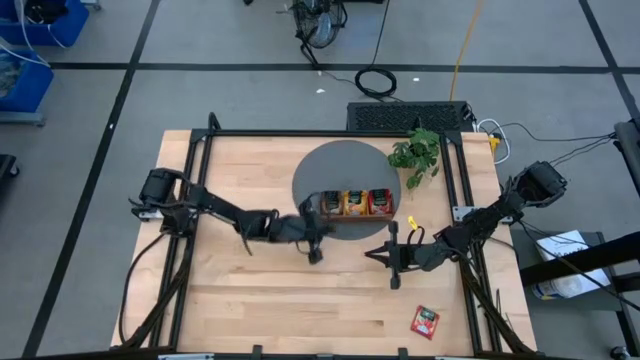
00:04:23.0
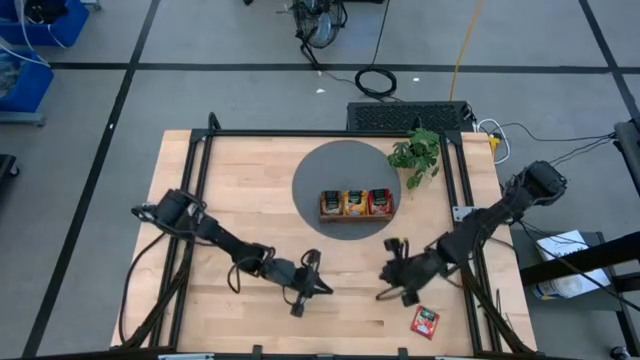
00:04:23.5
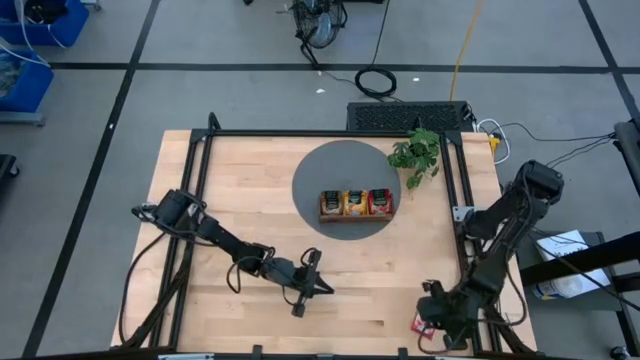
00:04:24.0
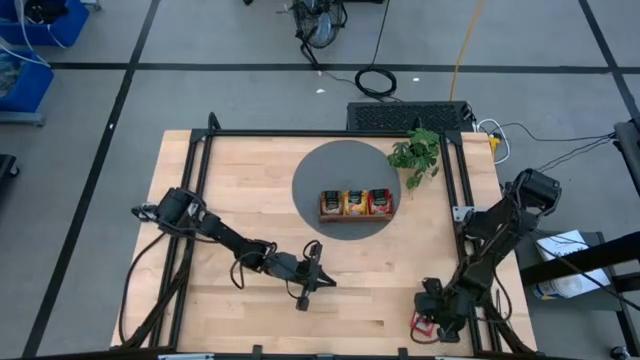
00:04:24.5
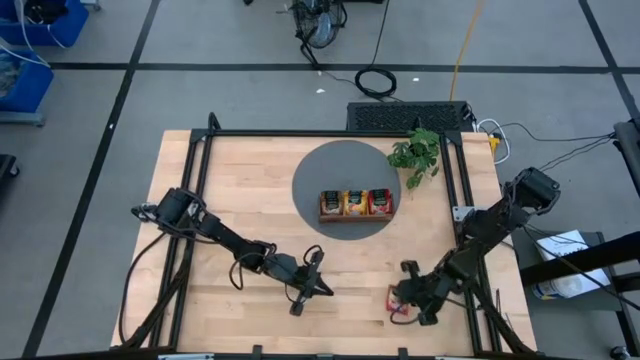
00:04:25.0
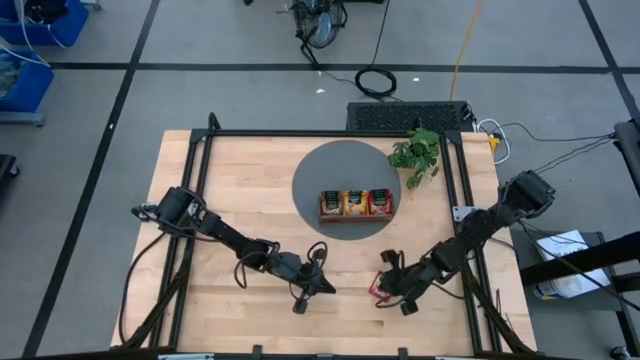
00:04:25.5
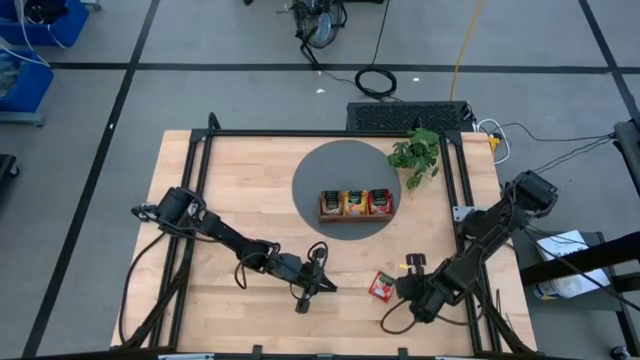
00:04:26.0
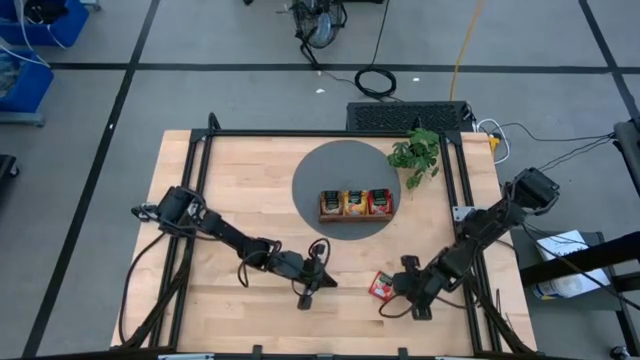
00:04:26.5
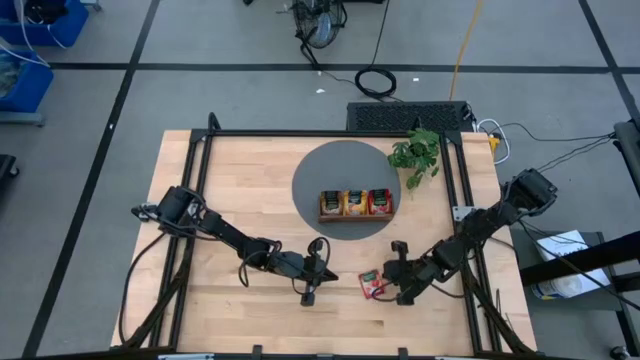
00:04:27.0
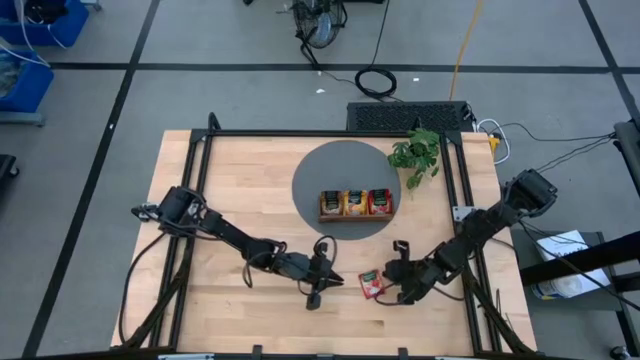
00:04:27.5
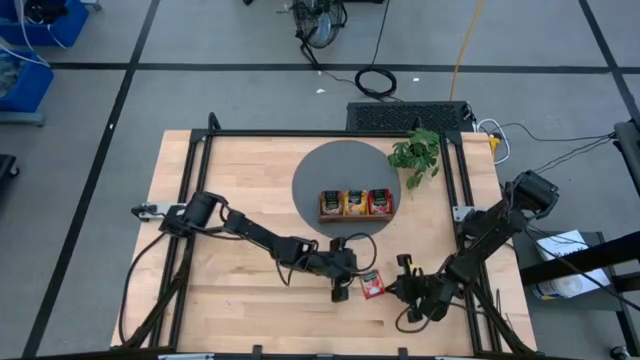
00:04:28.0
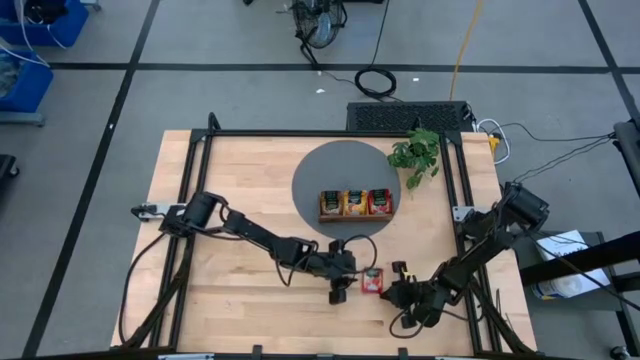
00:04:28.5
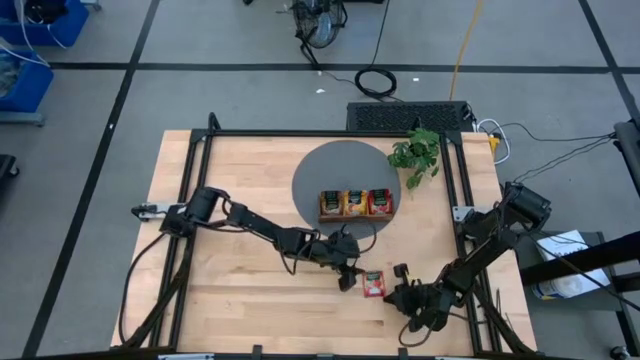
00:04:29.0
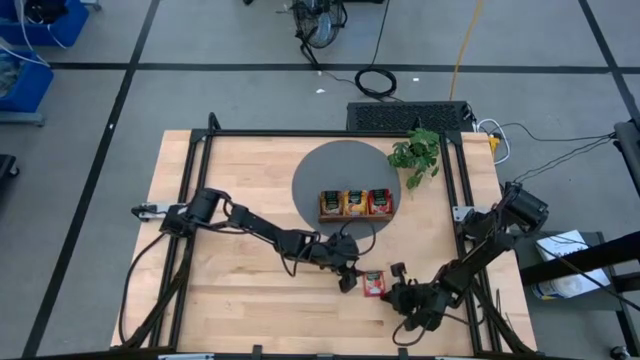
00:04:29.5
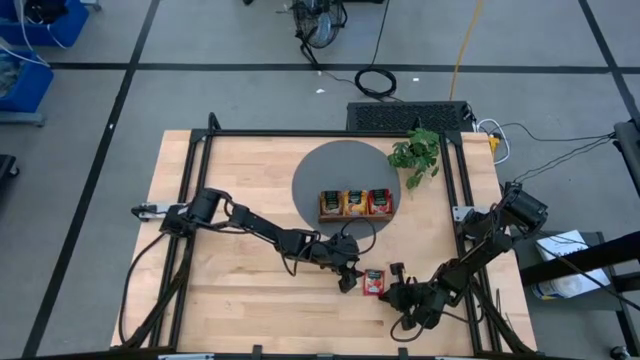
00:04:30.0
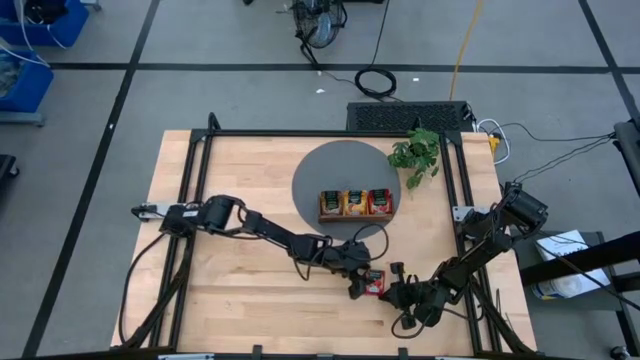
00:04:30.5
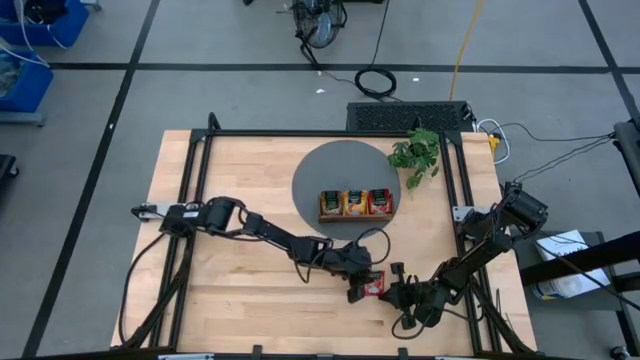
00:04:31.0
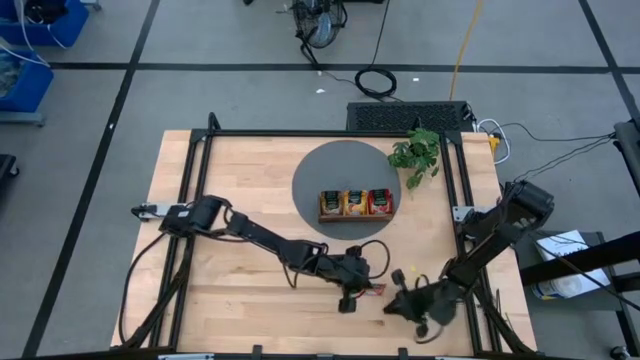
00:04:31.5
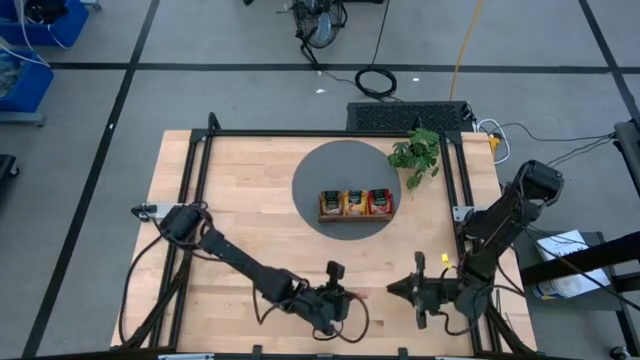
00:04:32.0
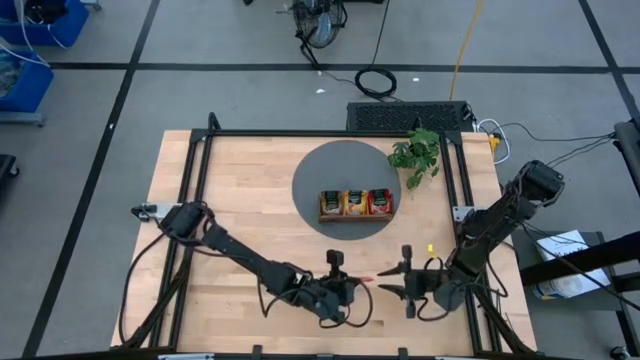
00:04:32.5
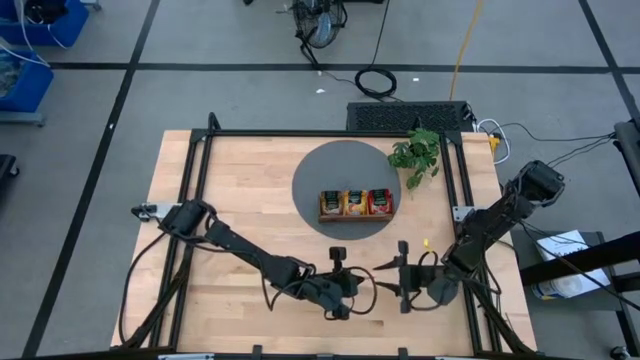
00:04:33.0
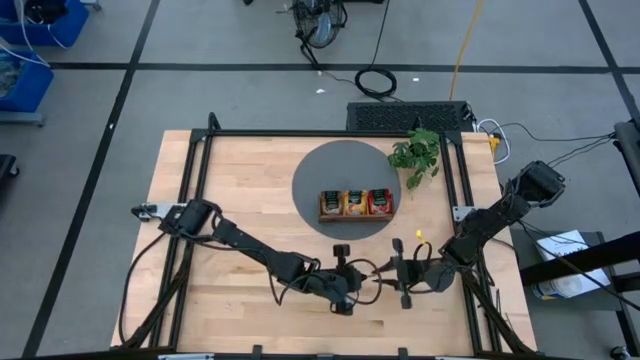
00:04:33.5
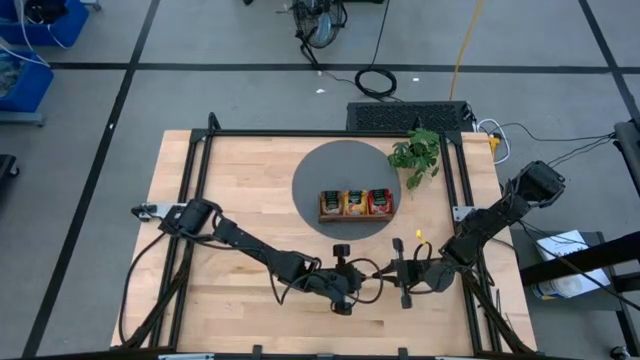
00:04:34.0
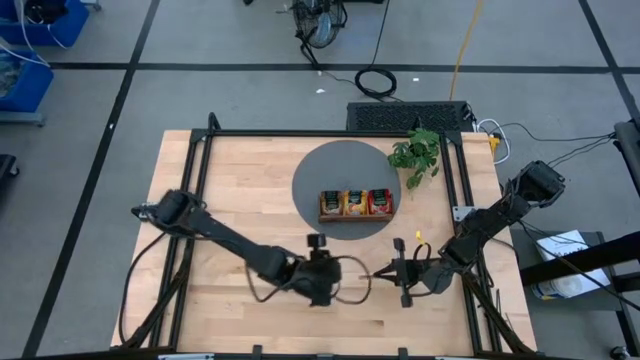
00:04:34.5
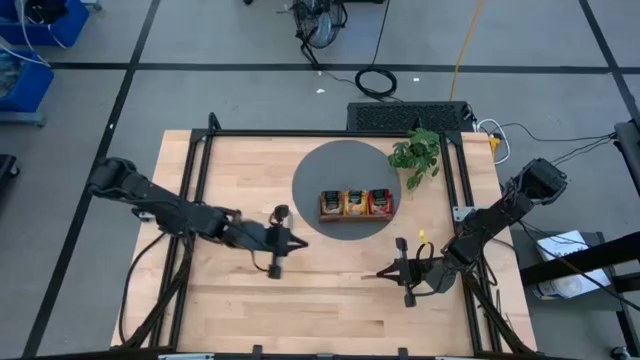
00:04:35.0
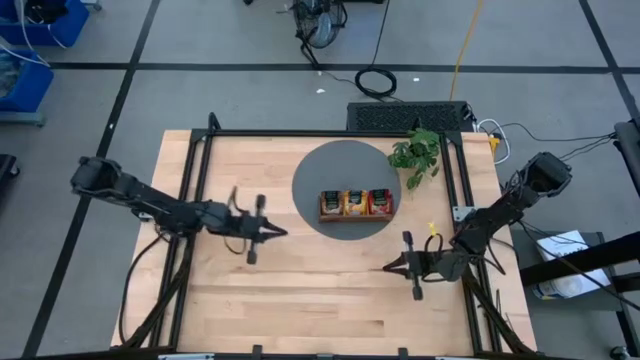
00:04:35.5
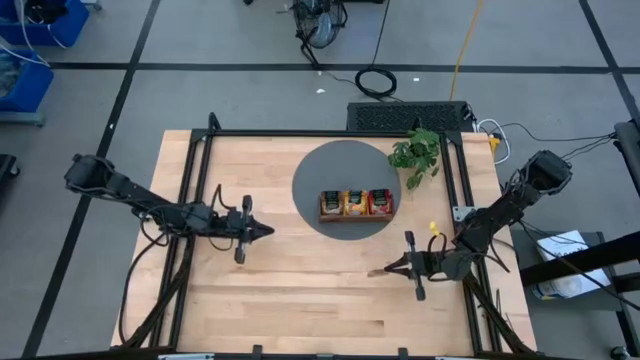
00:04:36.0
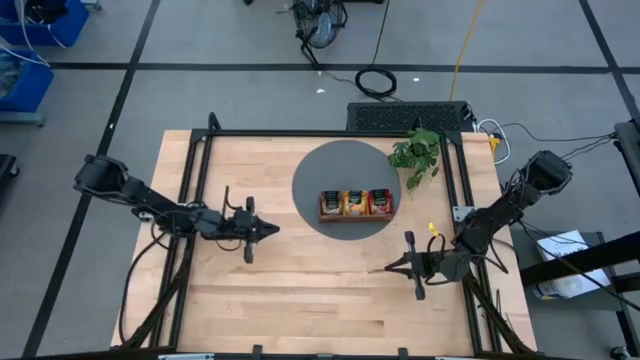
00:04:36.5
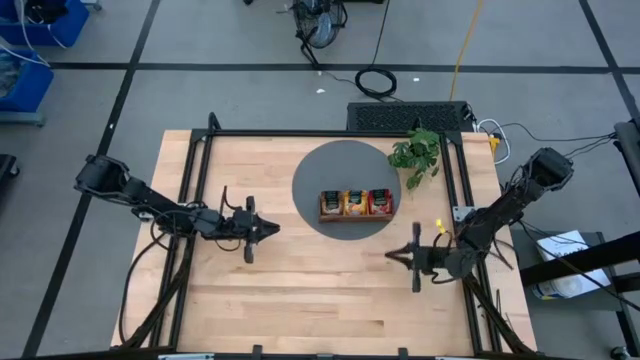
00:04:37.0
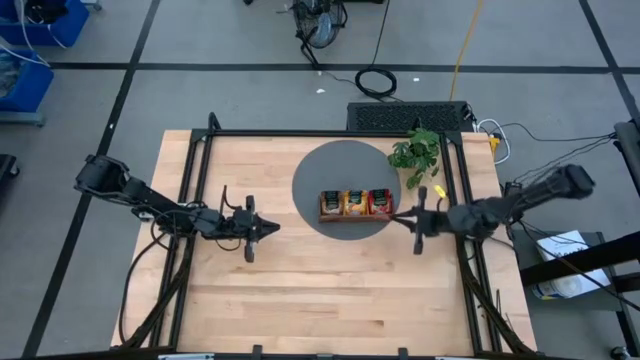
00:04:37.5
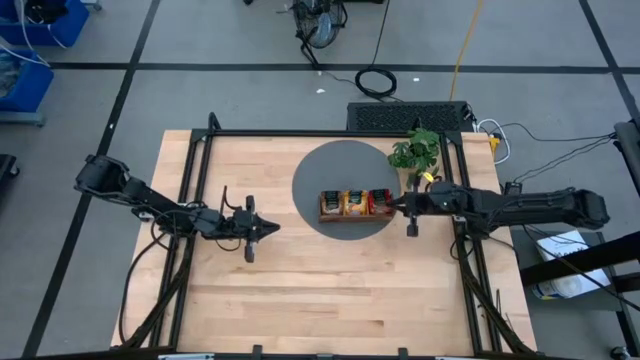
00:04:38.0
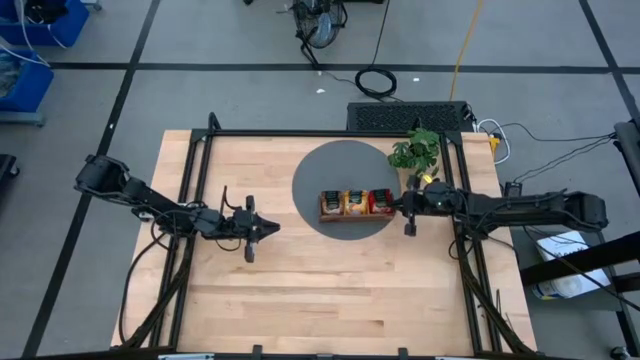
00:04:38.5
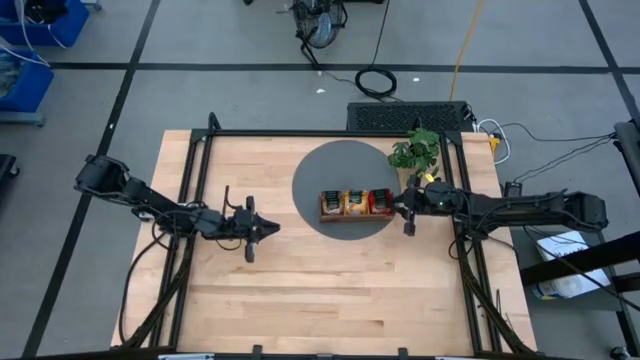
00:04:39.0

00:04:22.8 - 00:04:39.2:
Task: Pick & Place Tea
Put the red tea bag into the right section of the wooden organiser

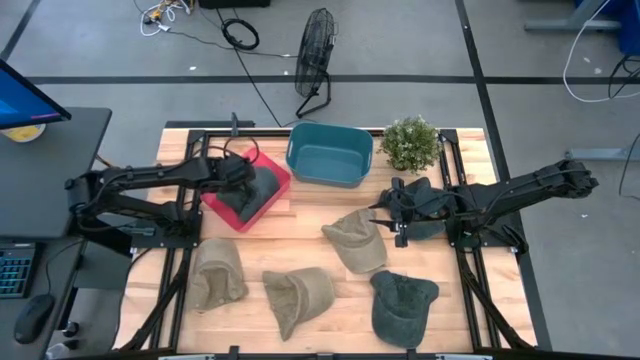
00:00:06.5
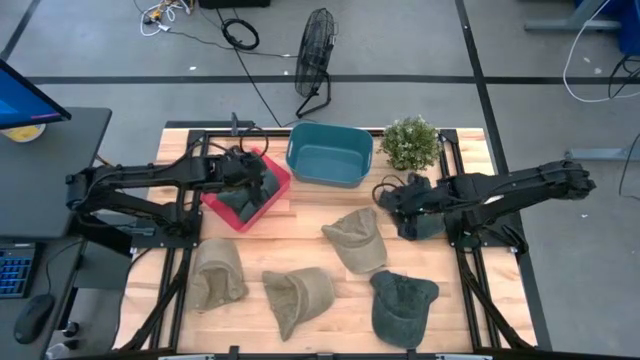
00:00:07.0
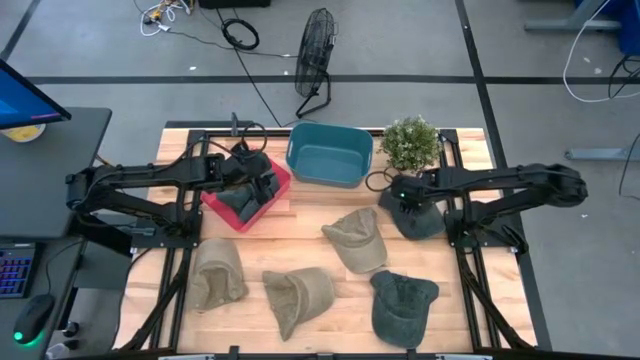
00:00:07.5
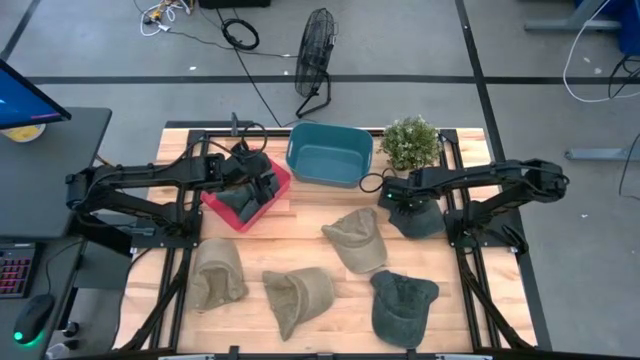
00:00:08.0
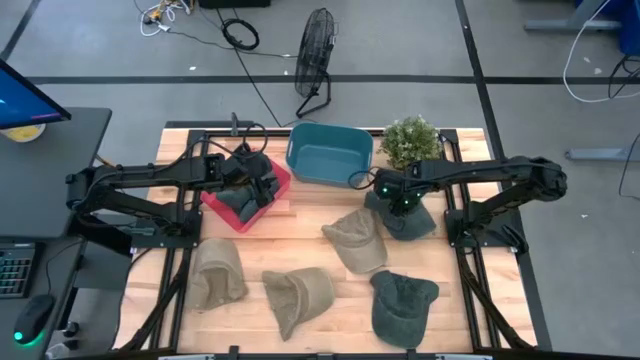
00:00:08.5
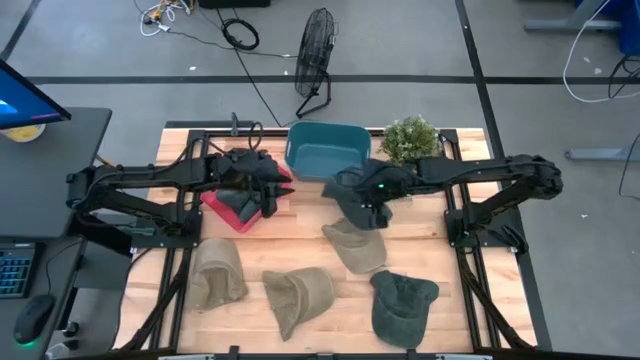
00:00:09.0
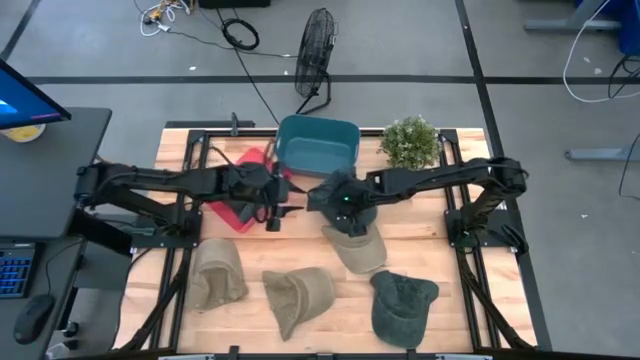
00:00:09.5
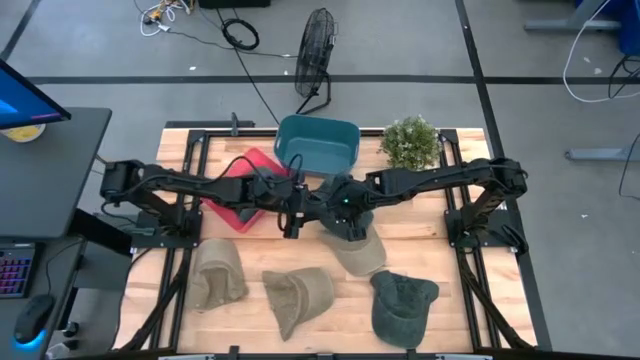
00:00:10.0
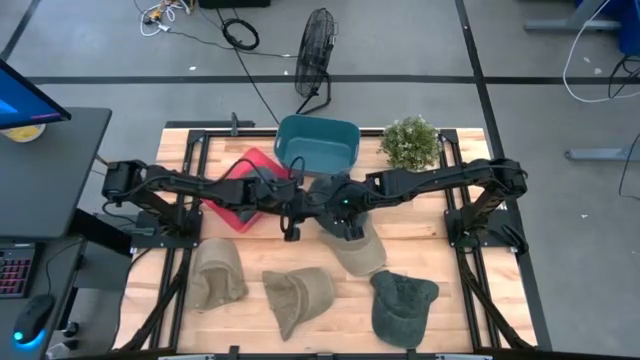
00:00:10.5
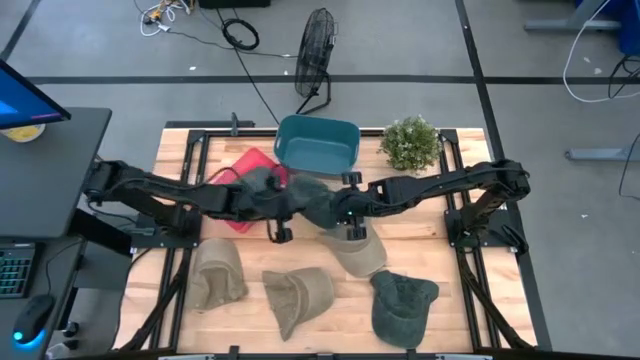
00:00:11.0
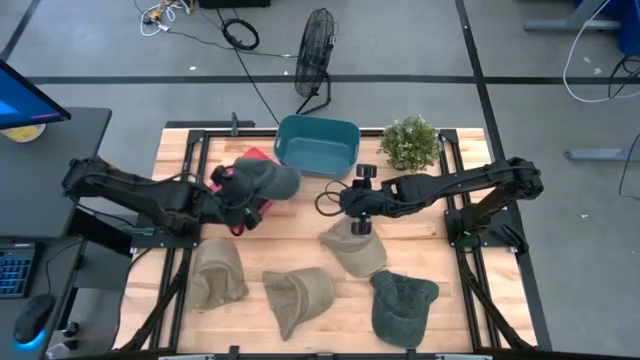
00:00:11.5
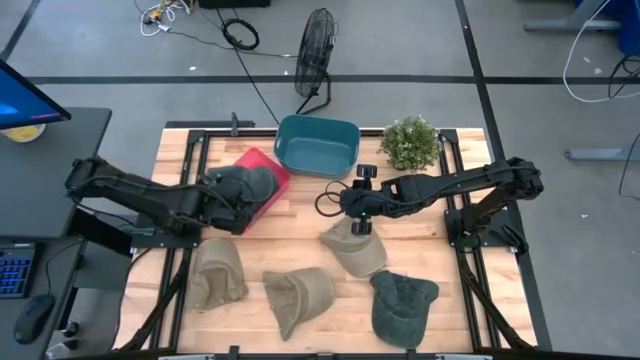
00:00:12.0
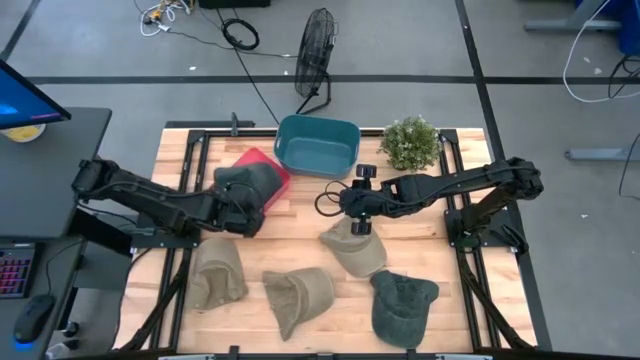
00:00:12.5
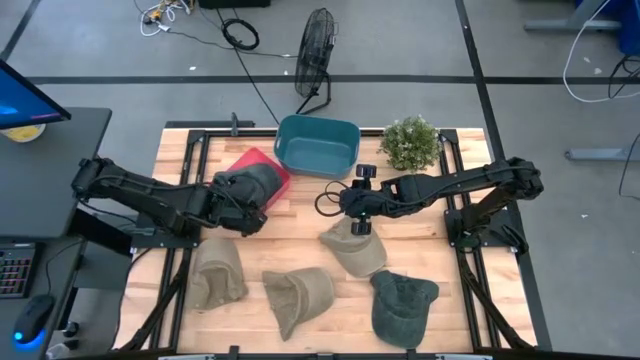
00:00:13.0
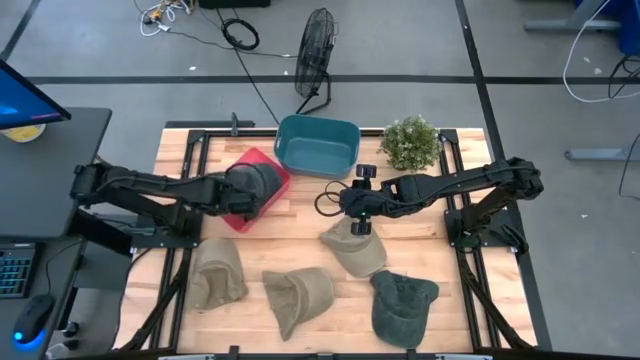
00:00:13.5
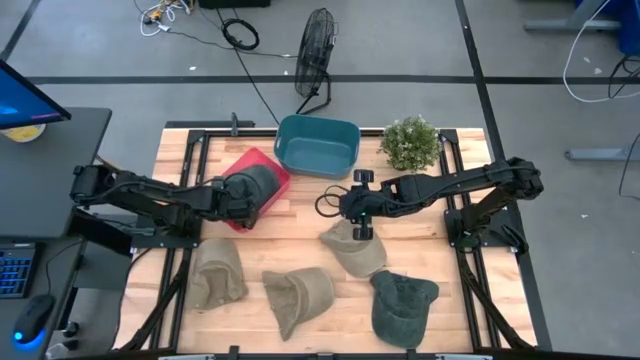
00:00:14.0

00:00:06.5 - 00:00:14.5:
Task: Pick & Place hat
Put the top dark blue cap into the pink bin
